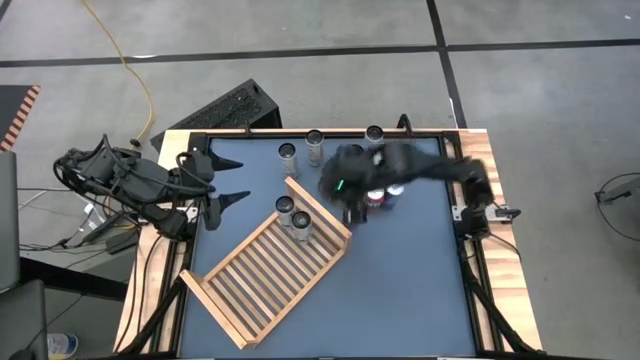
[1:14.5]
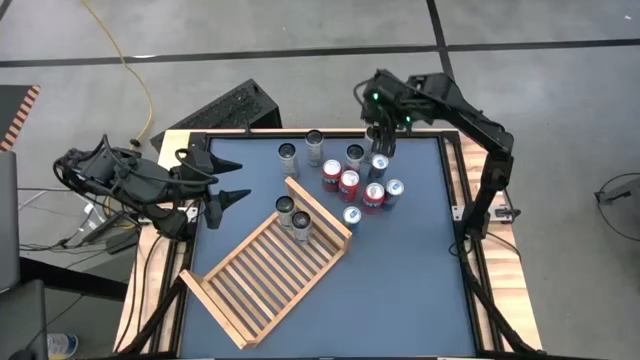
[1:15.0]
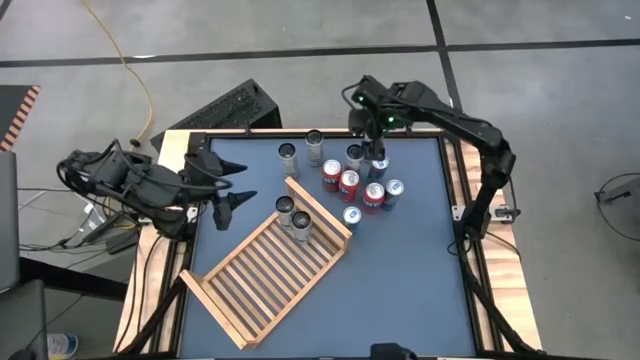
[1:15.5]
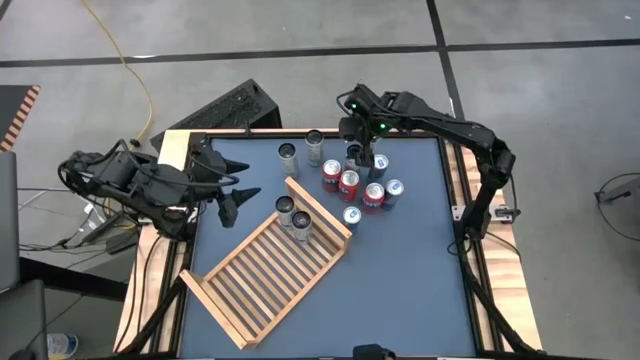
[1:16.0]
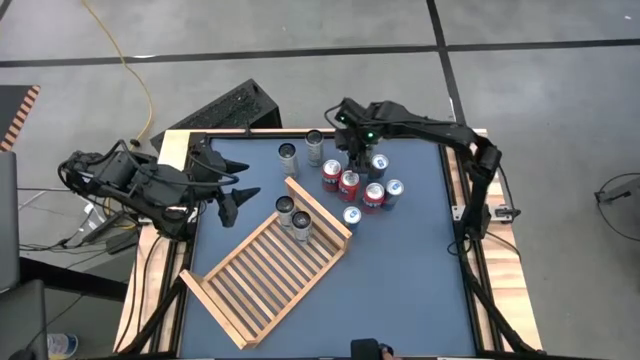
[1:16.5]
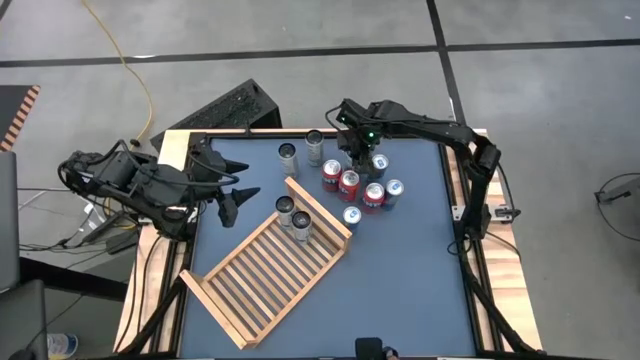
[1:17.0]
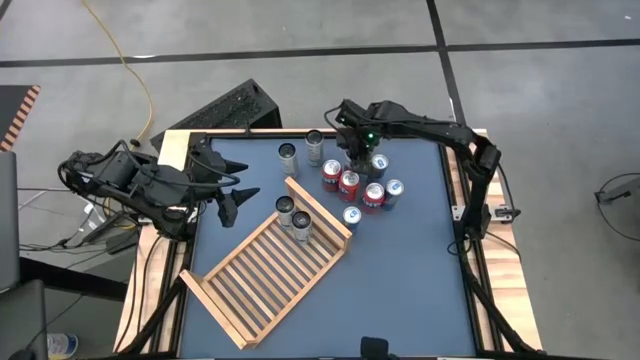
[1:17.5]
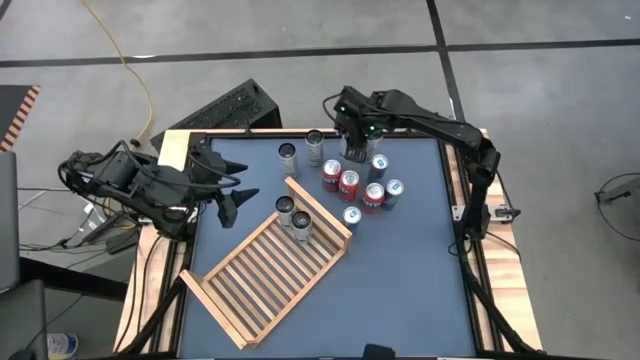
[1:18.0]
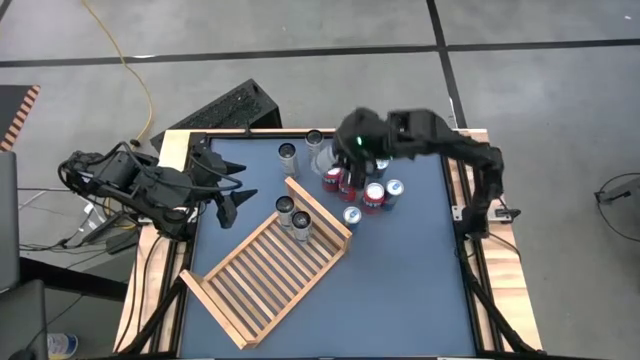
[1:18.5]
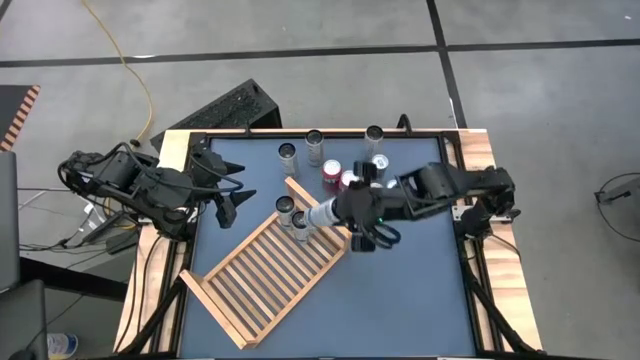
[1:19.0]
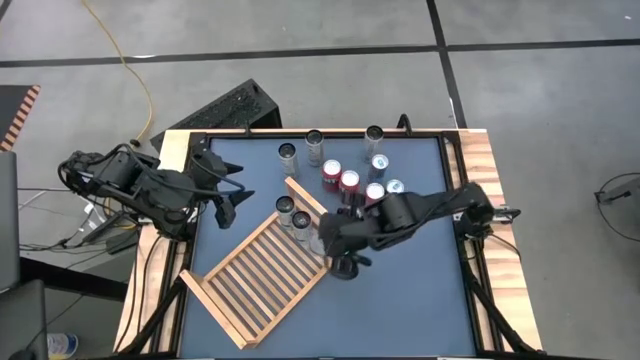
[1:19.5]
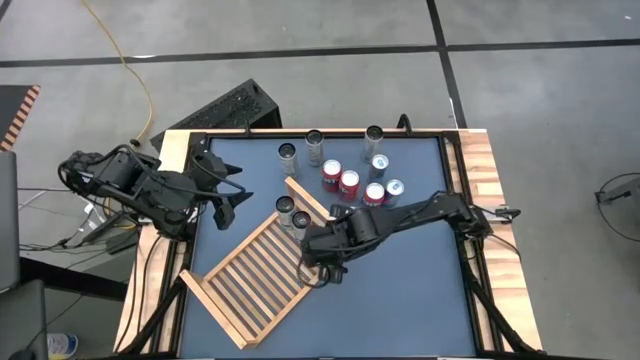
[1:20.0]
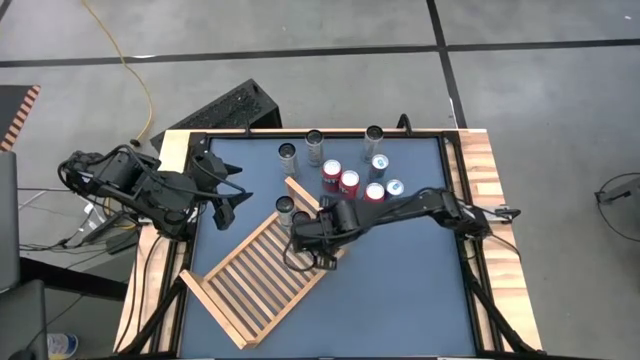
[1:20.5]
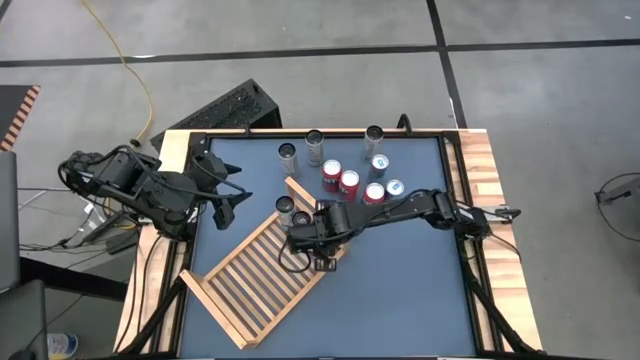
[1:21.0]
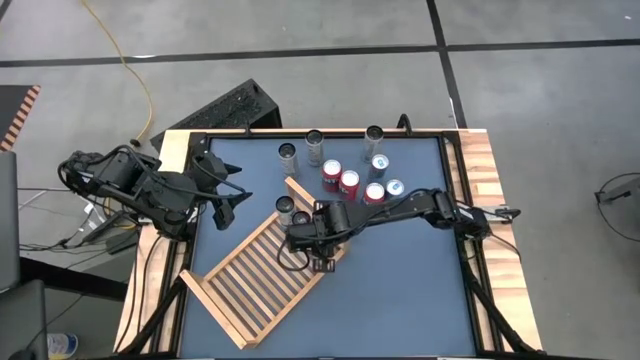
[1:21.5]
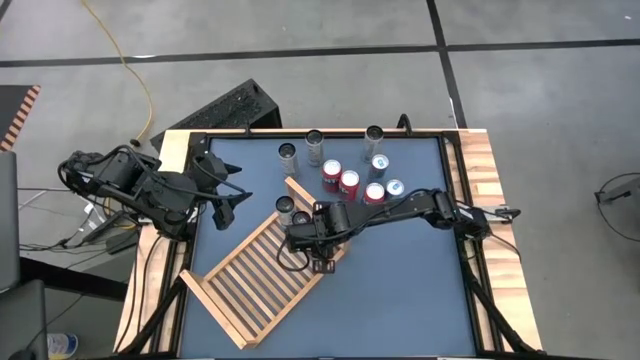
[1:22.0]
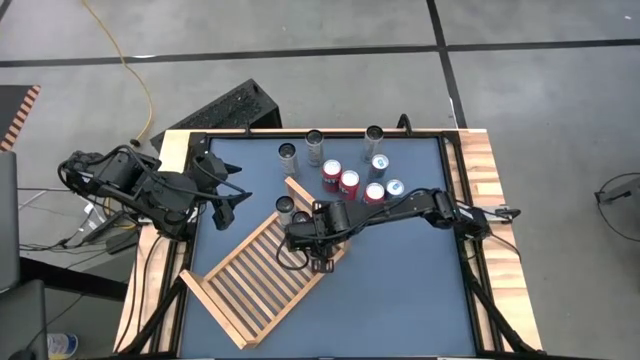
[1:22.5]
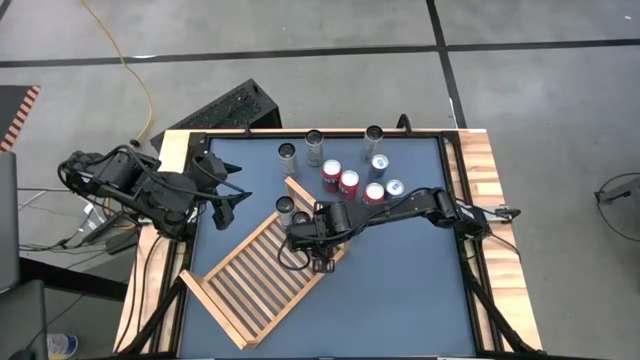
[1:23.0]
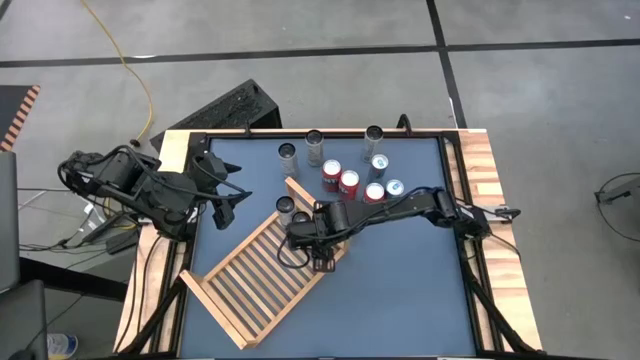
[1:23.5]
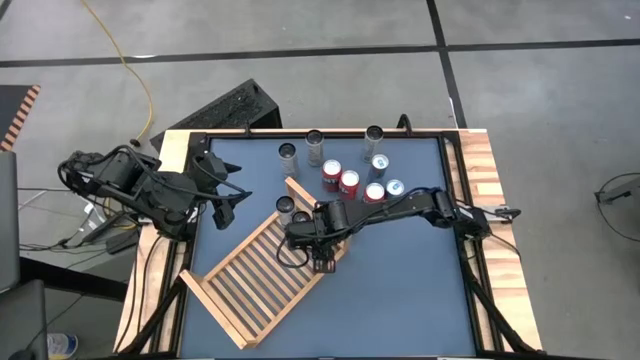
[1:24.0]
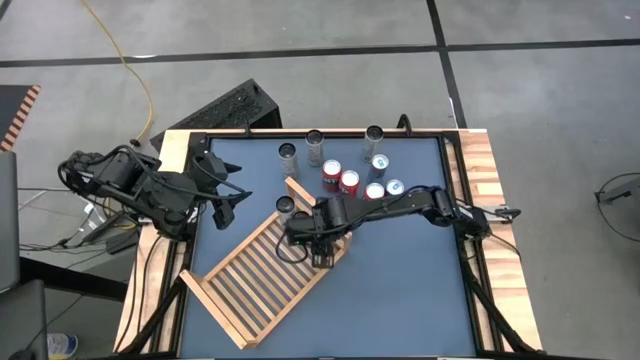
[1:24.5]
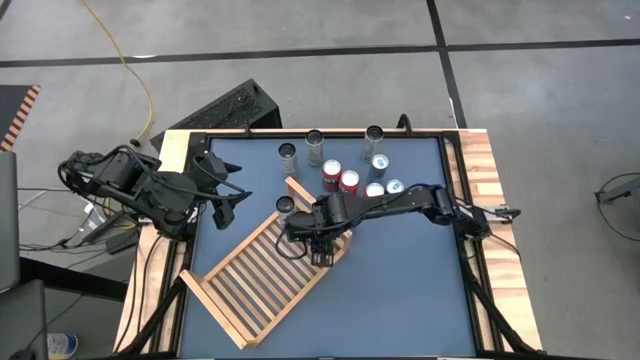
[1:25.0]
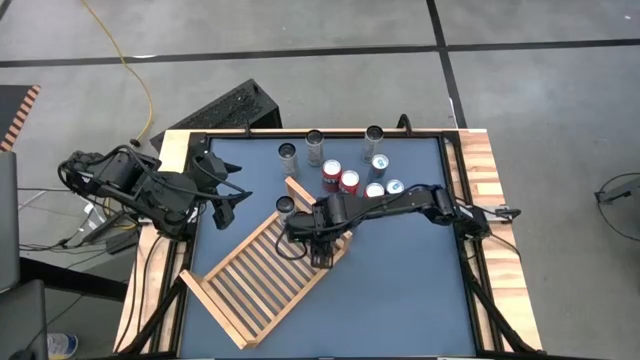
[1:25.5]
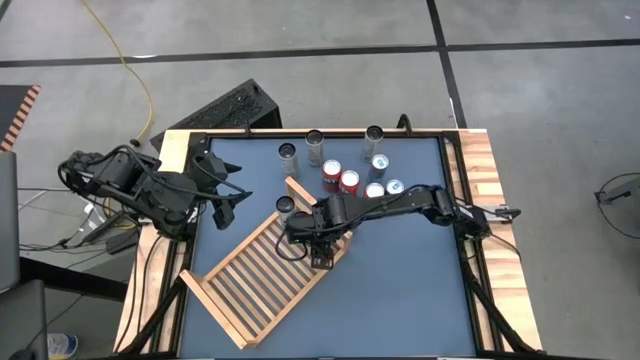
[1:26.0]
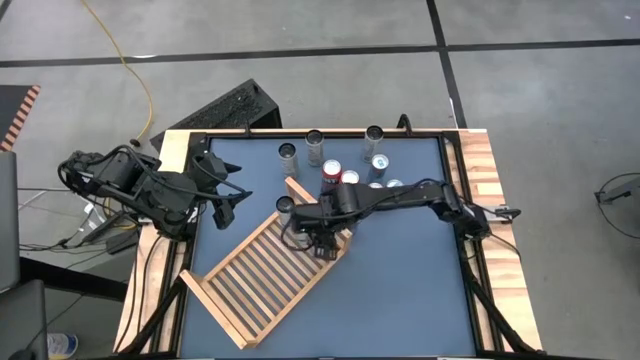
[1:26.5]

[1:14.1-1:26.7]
Task: Place canned beverage on shelf
Put the white blue soda can on the shelf aligned with the other white blue soda cans

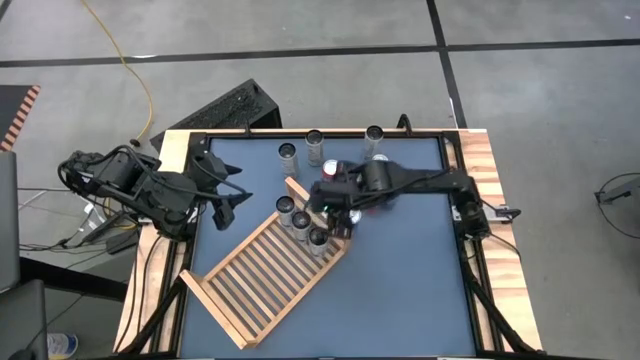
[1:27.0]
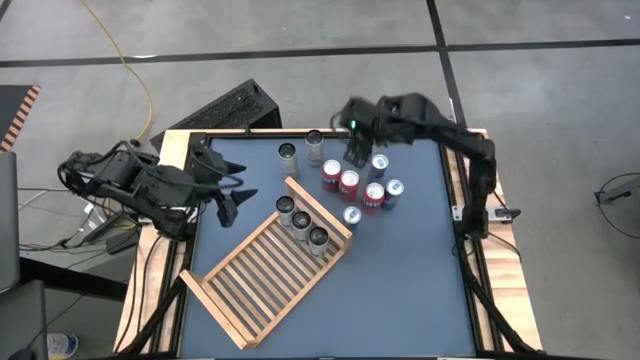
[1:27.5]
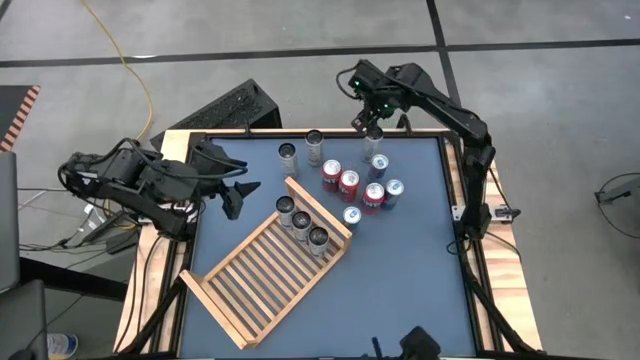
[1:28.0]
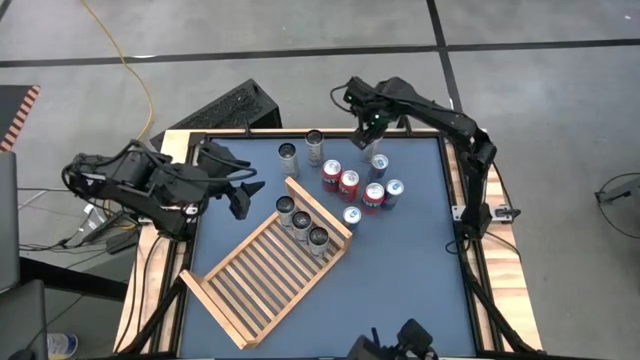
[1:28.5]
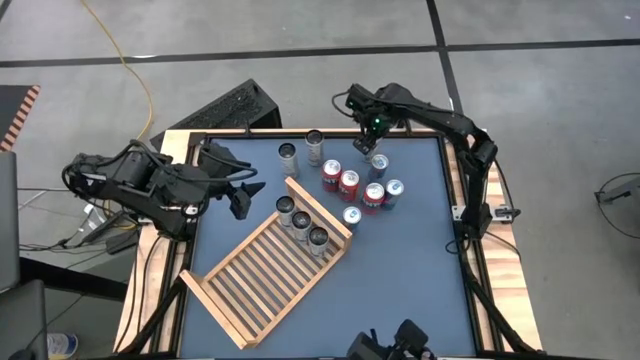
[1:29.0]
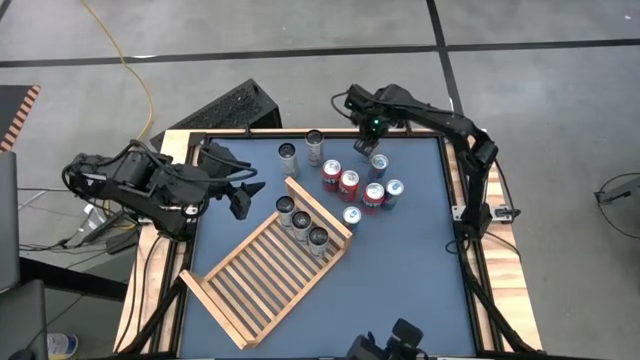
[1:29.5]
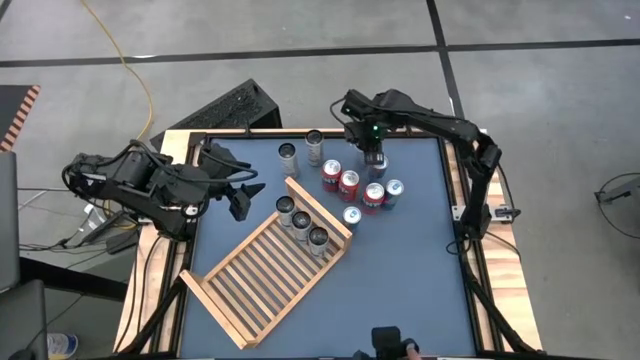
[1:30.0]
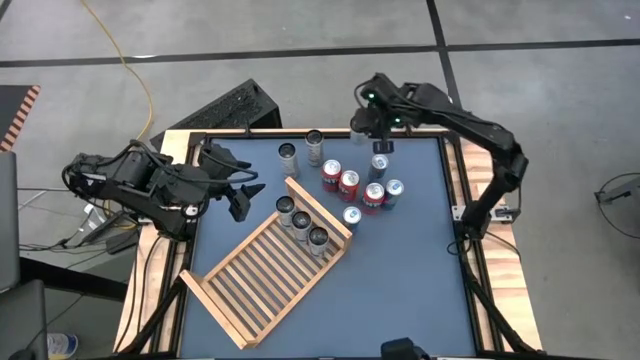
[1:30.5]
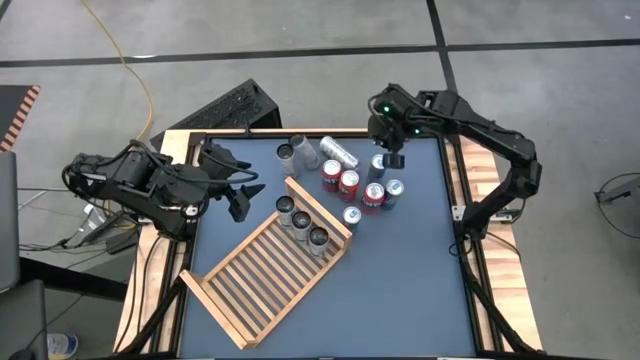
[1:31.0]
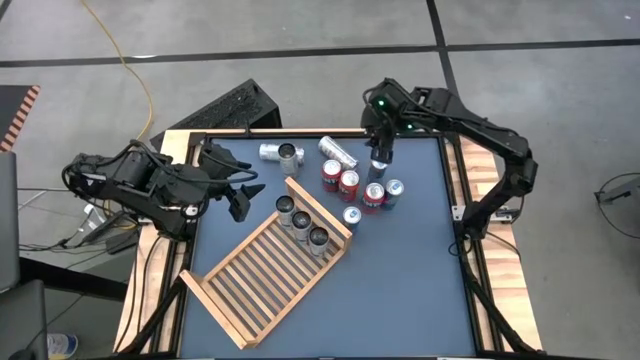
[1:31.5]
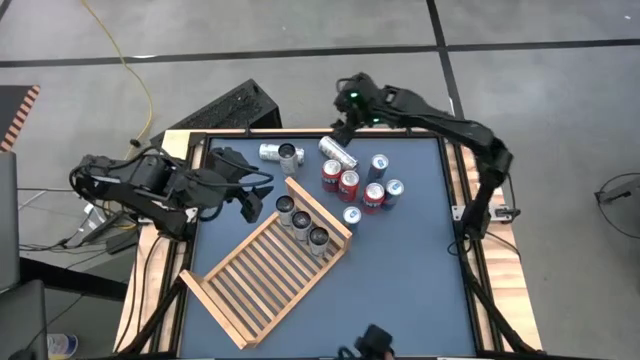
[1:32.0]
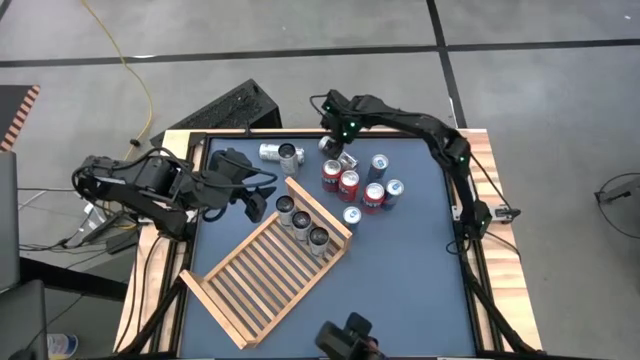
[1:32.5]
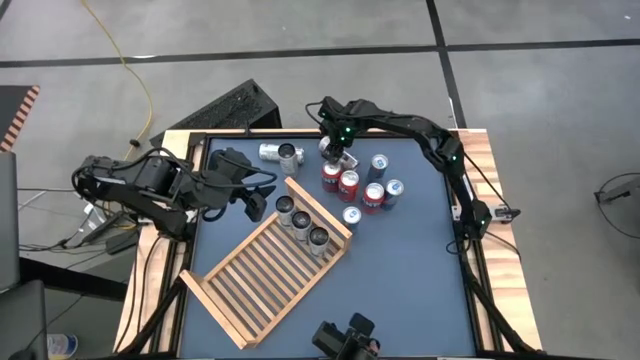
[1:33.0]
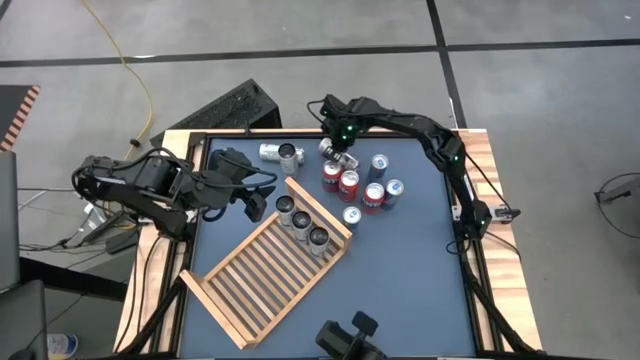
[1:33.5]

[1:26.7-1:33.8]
Put the top right white yellow soda can on the shelf
